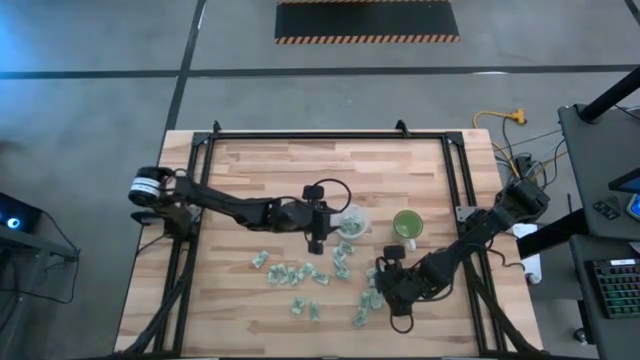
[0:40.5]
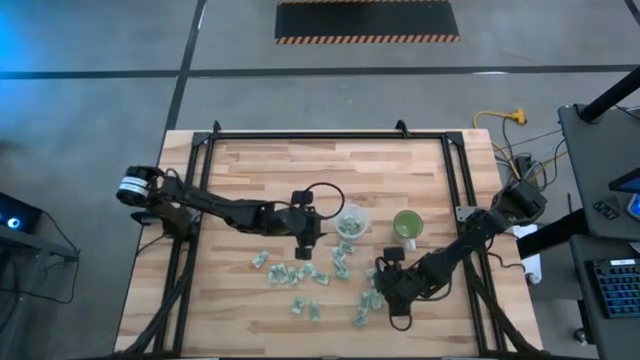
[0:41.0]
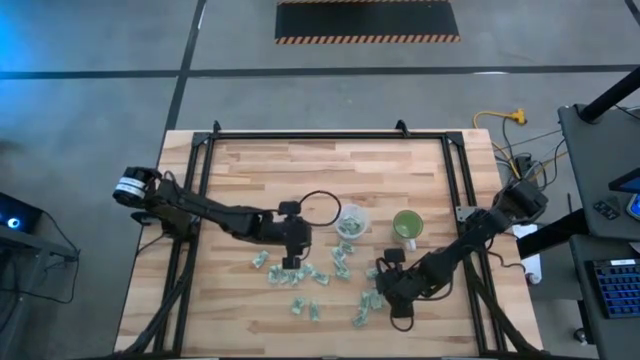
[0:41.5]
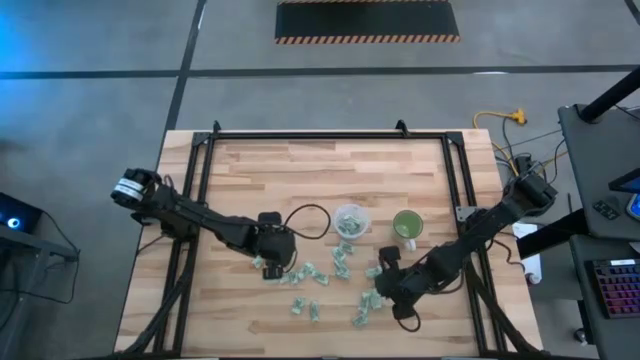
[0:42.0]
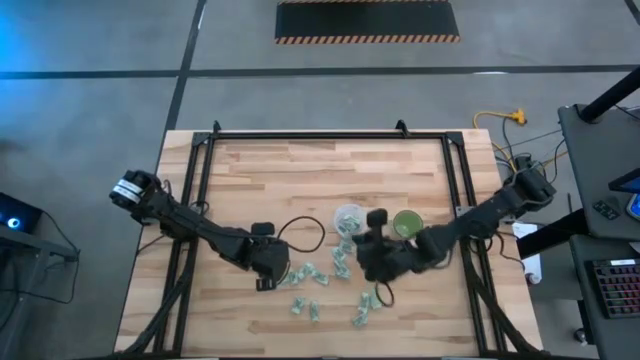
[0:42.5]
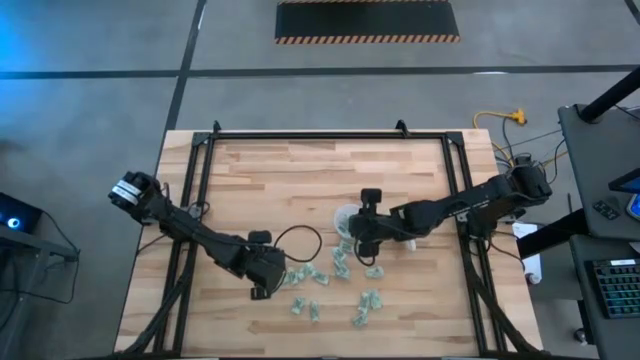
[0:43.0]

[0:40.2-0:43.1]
Task: Pick and place Stevia / Truvia into bins
Put the green stevia packet into the transparent container

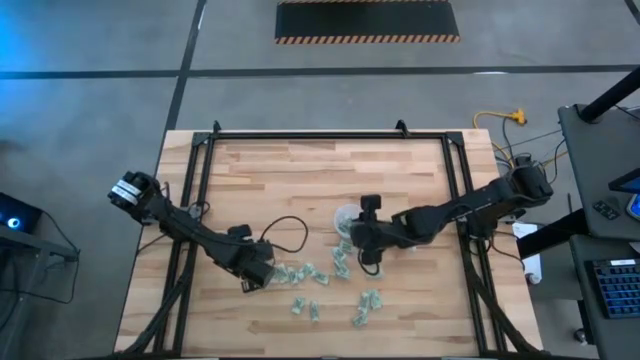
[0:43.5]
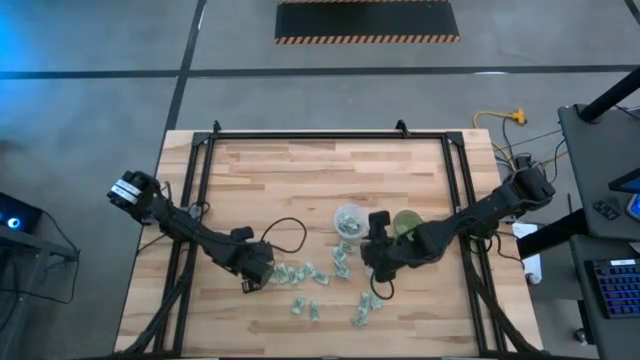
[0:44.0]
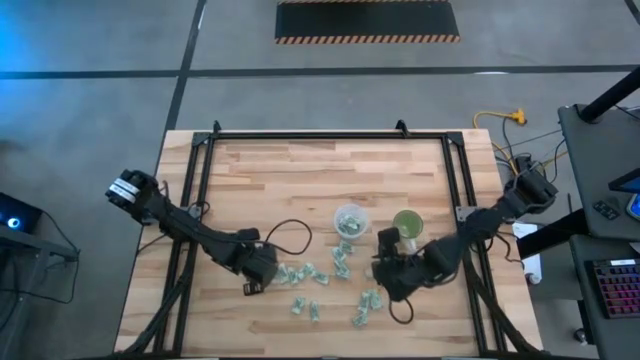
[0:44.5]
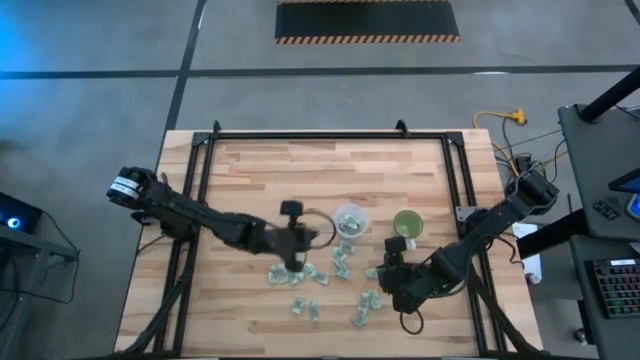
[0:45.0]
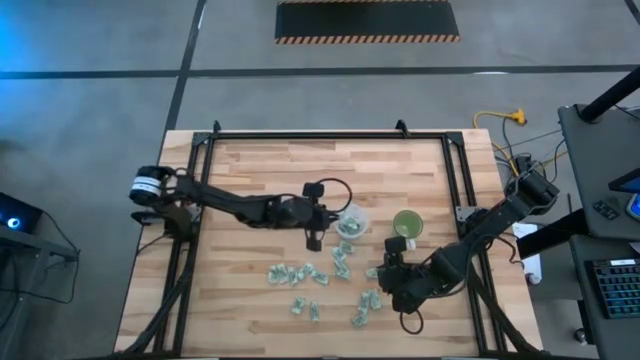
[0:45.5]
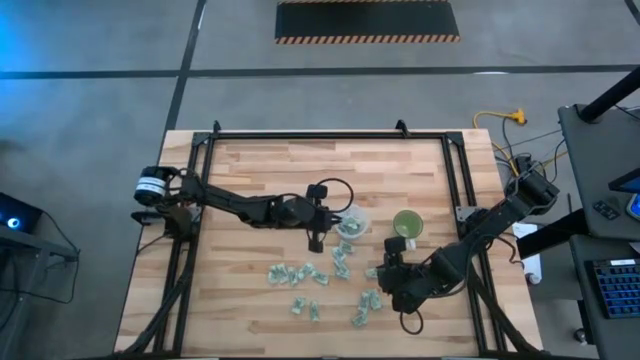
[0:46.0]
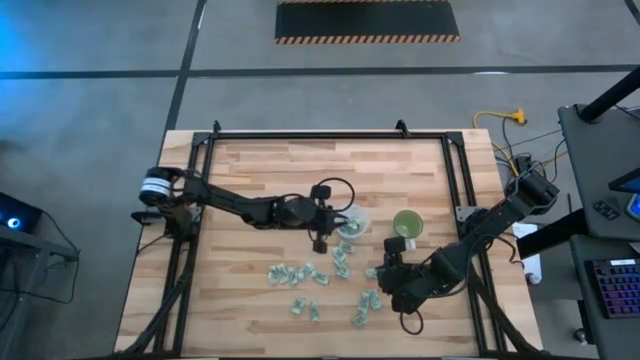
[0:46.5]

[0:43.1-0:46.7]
Put the green stevia packet into the transparent container

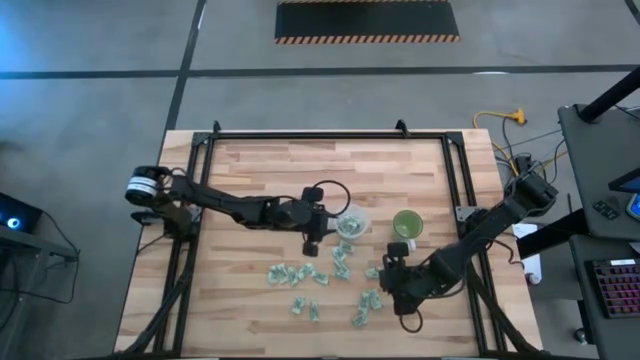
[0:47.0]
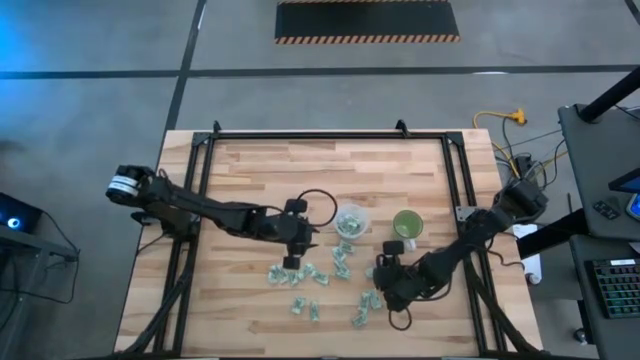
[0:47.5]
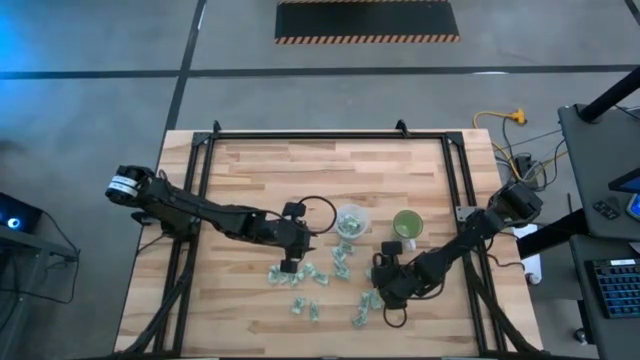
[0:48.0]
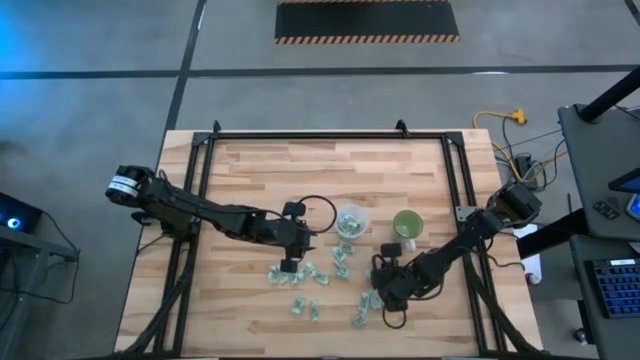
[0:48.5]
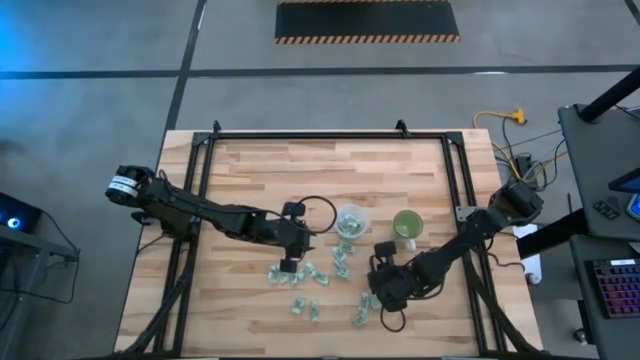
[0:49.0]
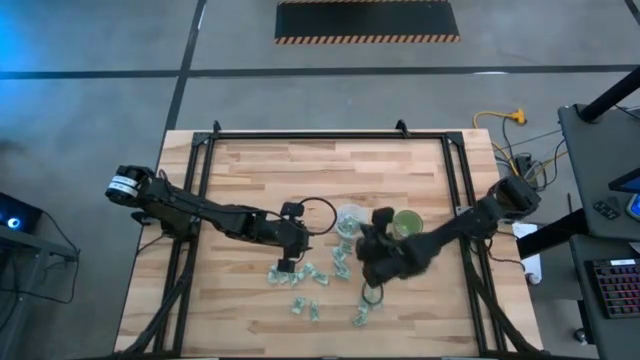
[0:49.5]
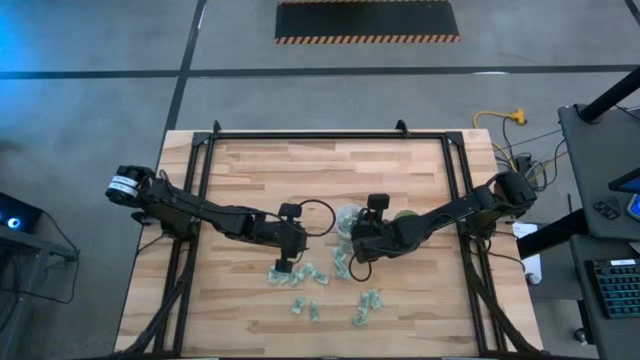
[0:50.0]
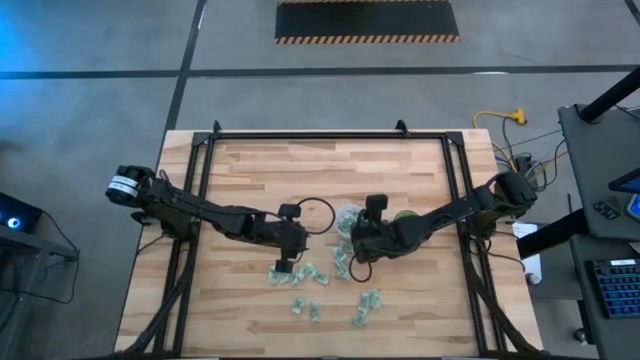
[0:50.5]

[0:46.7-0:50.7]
Put the green stevia packet into the transparent container

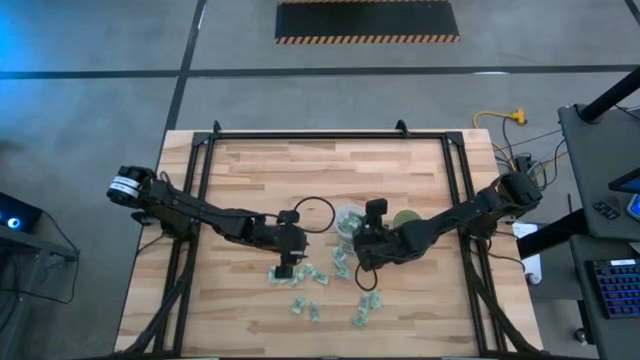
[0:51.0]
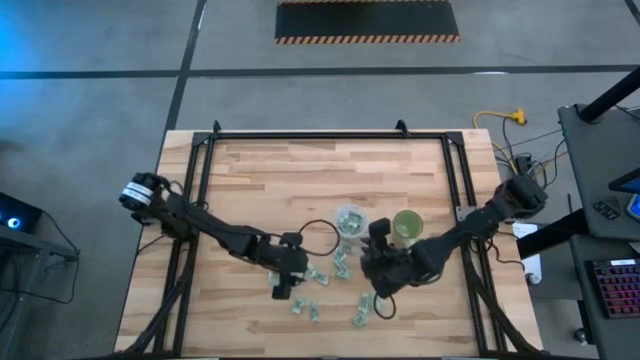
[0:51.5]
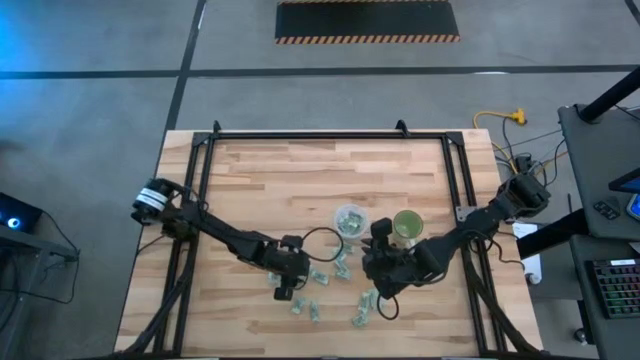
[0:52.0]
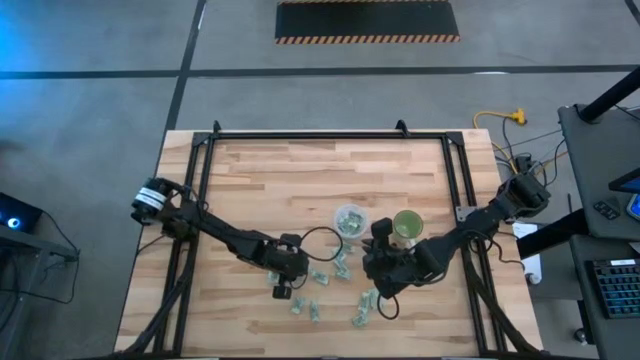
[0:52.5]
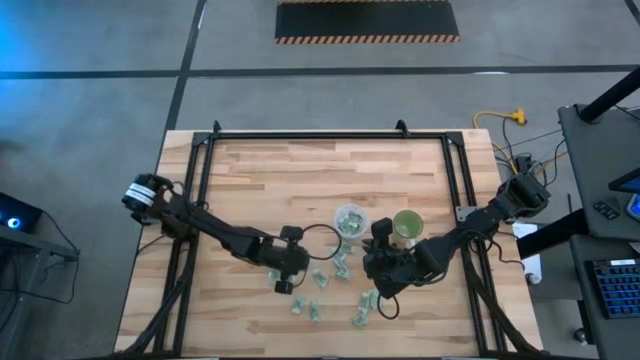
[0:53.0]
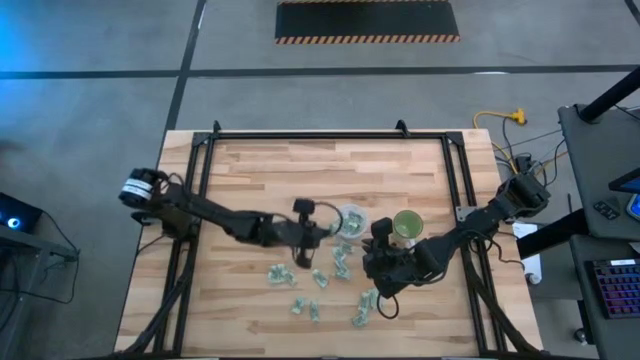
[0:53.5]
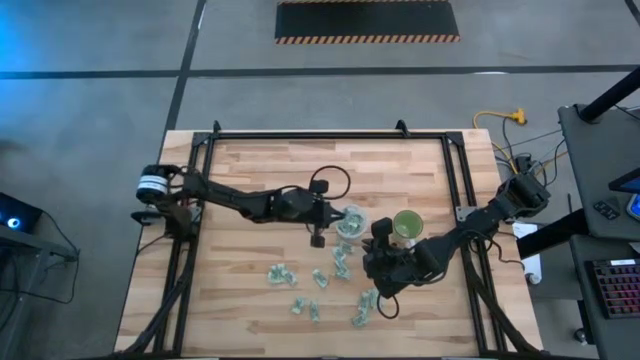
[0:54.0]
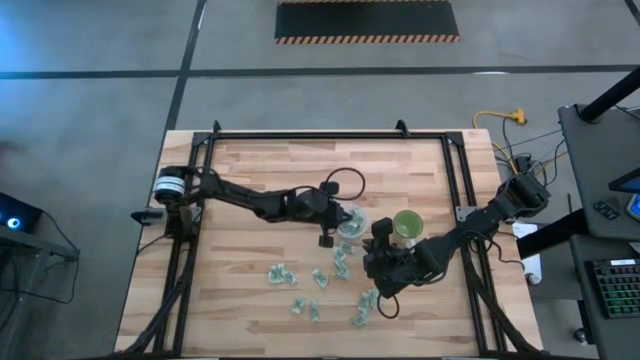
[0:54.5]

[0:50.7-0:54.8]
Put the green stevia packet into the transparent container

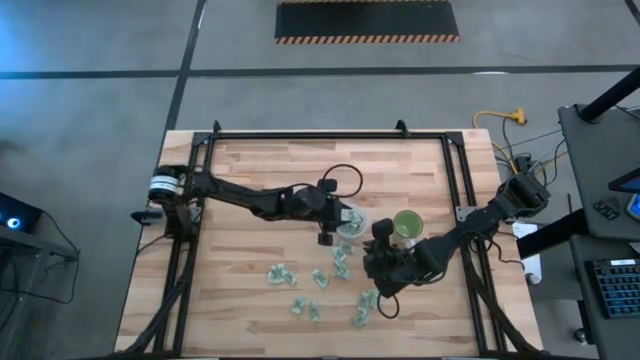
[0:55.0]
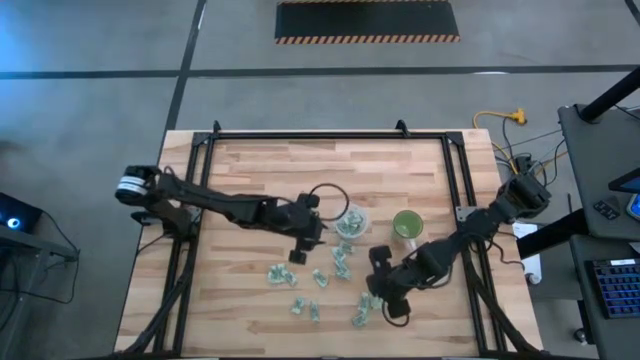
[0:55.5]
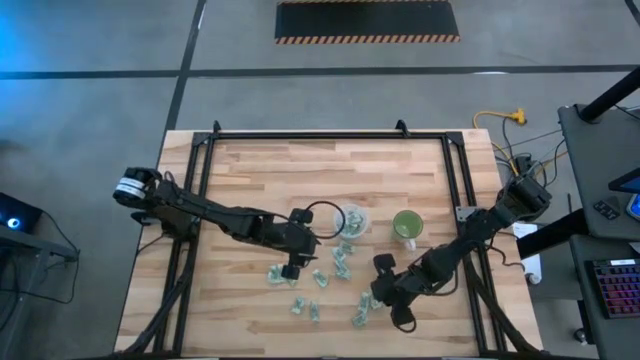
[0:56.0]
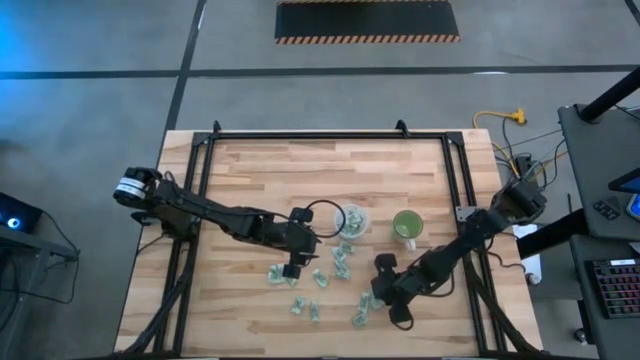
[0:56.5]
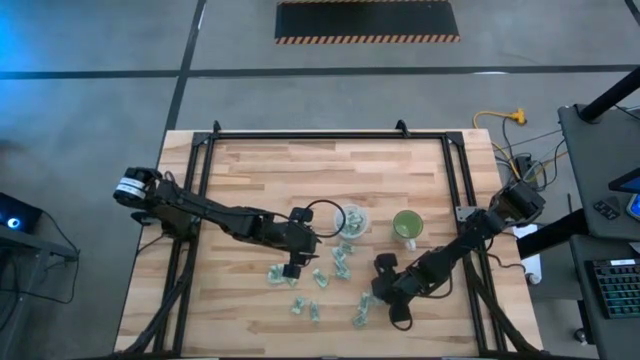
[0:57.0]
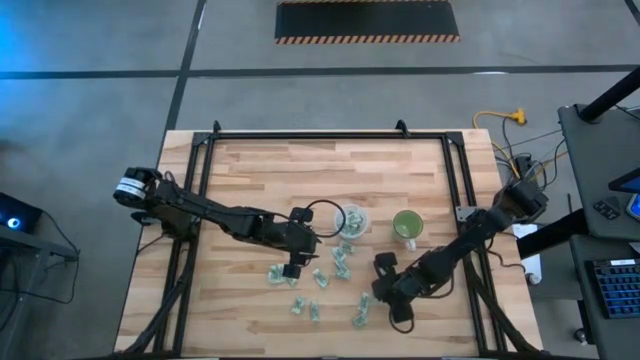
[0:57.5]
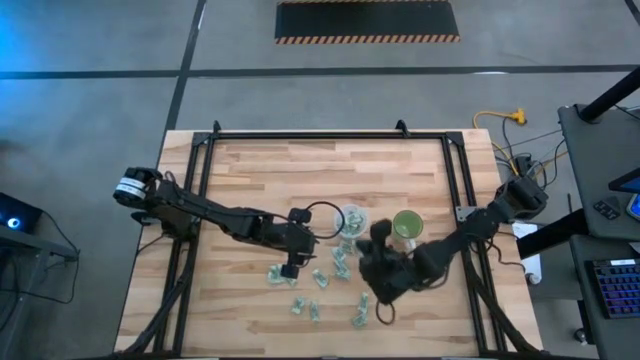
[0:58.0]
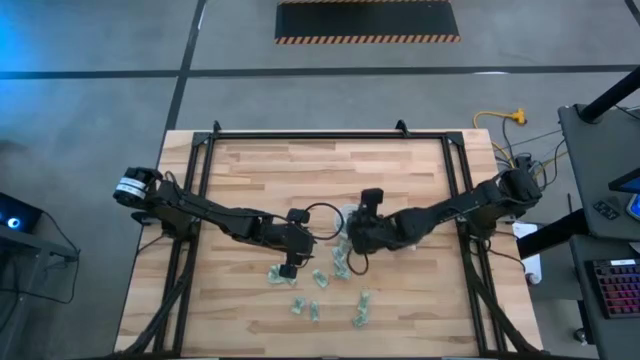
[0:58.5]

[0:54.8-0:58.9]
Put the green stevia packet into the transparent container

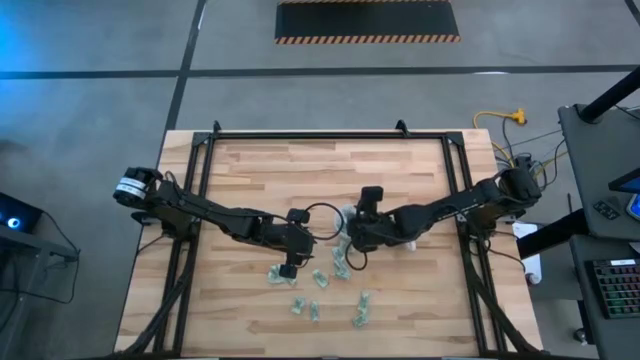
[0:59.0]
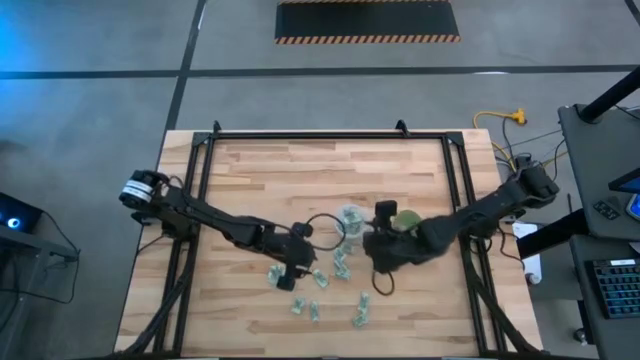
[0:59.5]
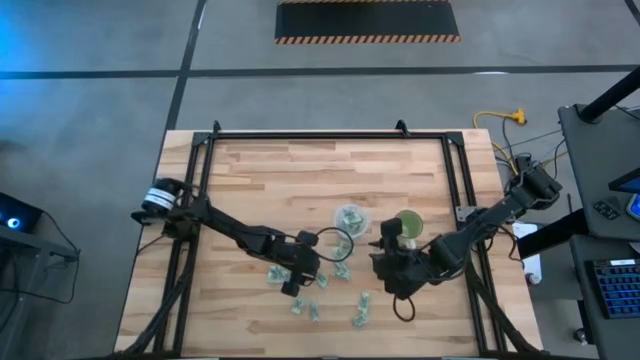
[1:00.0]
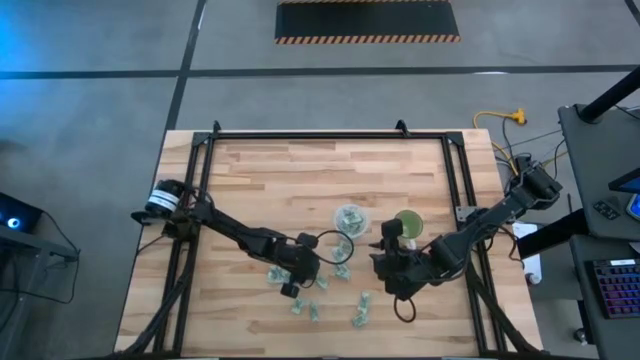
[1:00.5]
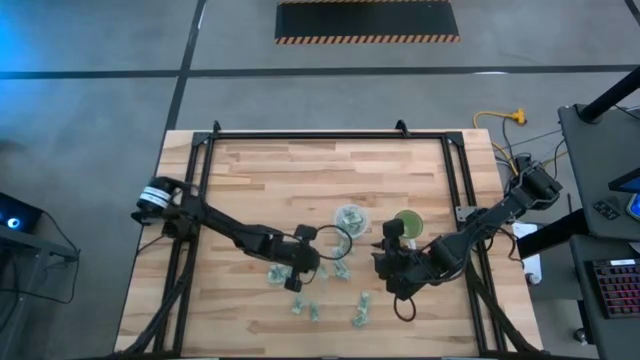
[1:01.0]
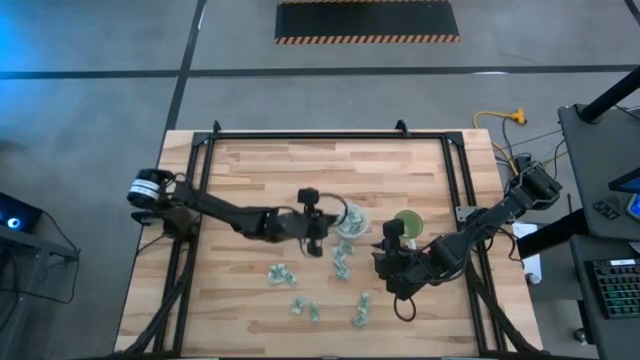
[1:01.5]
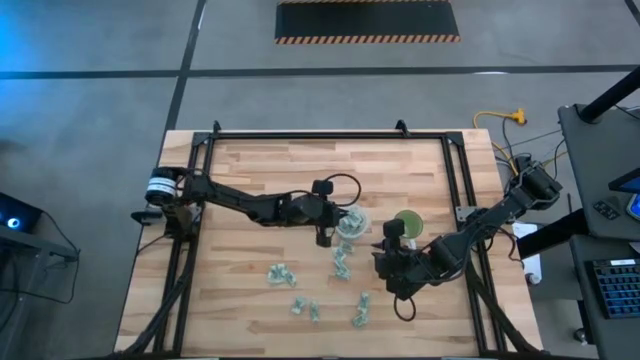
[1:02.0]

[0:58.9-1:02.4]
Put the green stevia packet into the transparent container
